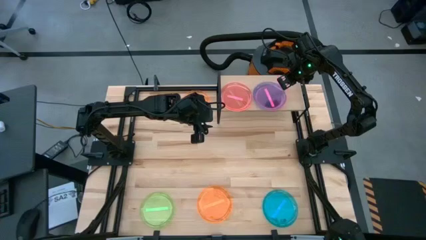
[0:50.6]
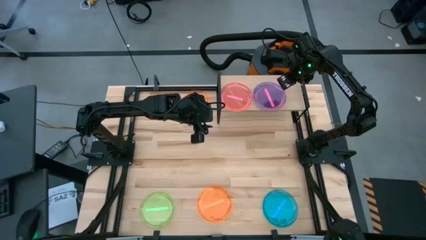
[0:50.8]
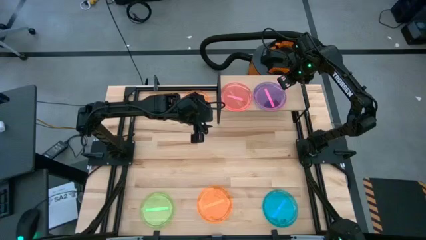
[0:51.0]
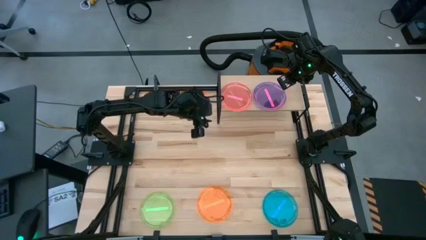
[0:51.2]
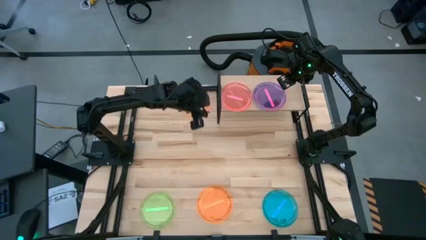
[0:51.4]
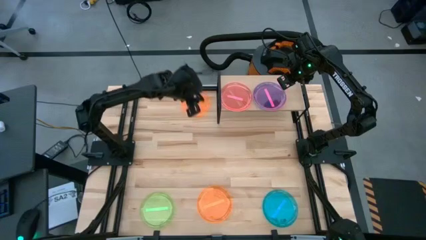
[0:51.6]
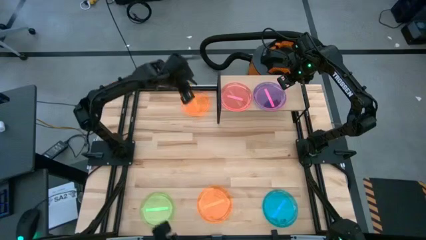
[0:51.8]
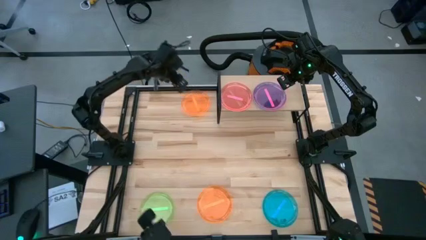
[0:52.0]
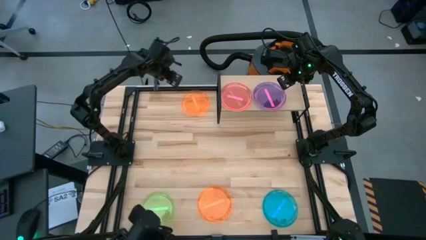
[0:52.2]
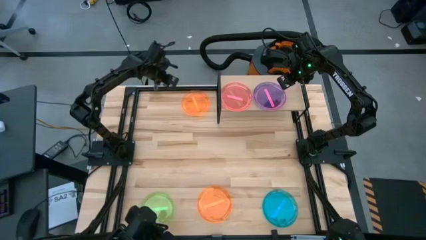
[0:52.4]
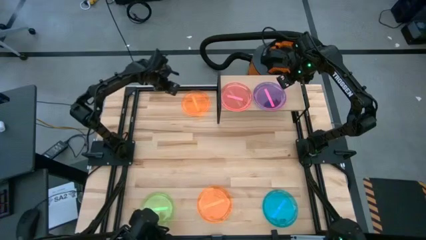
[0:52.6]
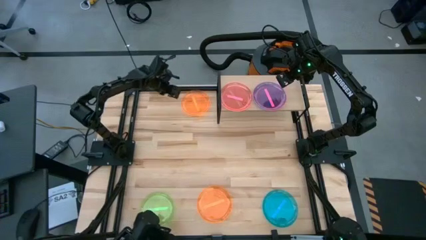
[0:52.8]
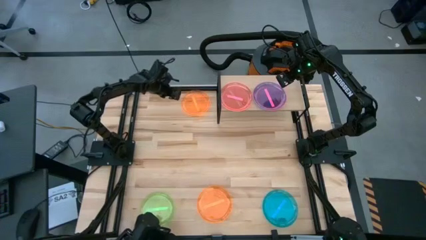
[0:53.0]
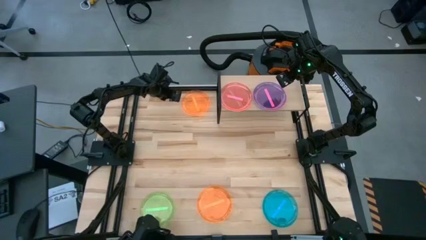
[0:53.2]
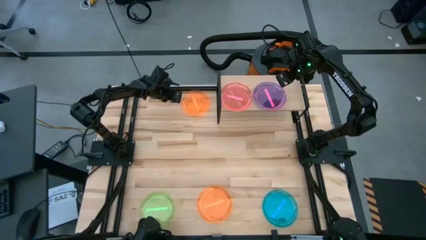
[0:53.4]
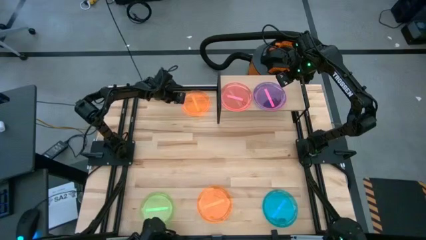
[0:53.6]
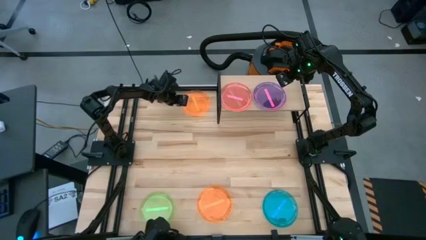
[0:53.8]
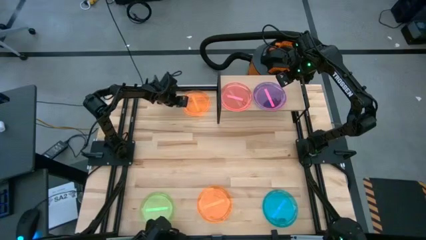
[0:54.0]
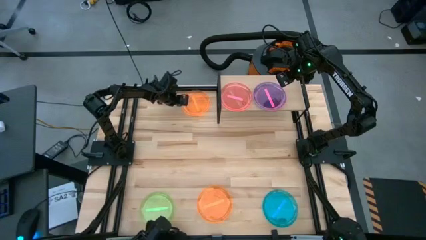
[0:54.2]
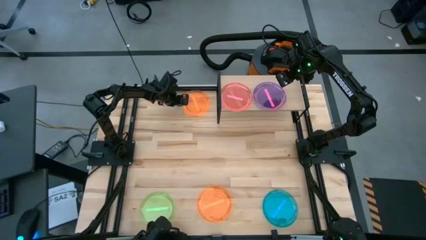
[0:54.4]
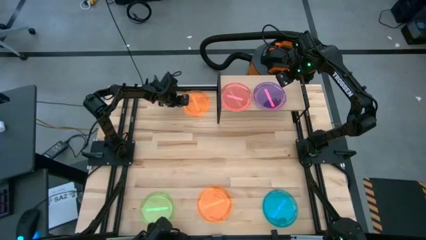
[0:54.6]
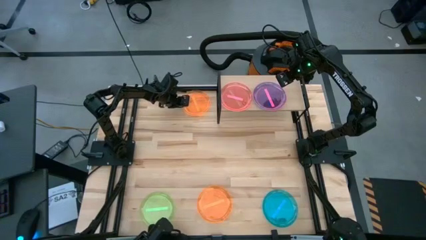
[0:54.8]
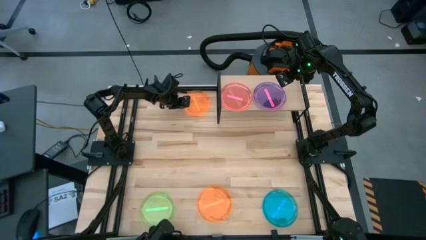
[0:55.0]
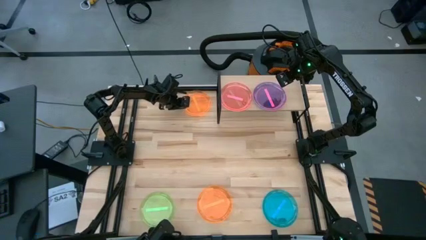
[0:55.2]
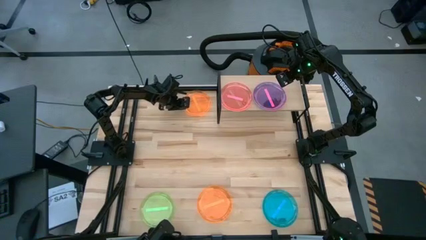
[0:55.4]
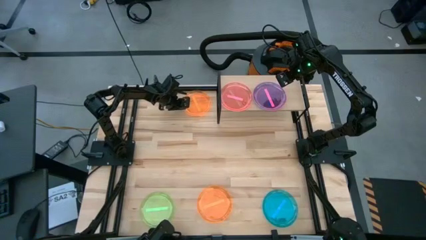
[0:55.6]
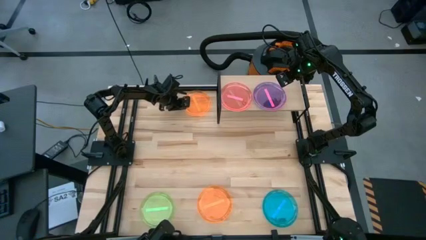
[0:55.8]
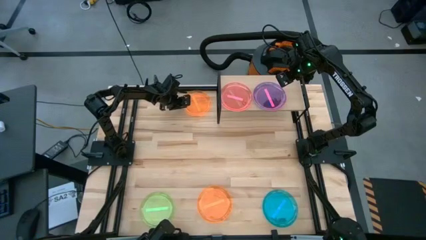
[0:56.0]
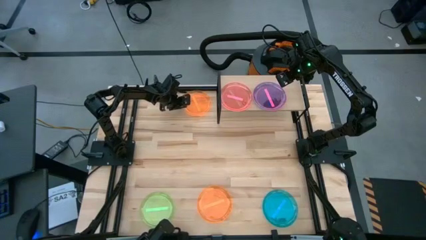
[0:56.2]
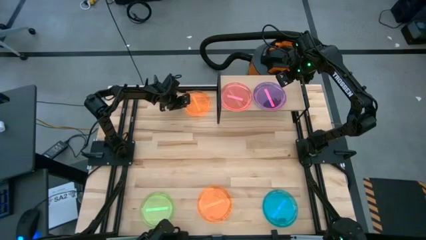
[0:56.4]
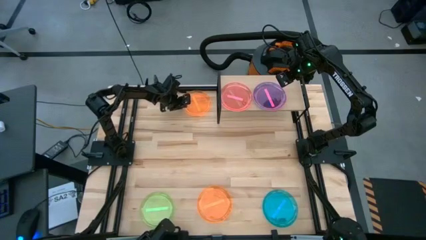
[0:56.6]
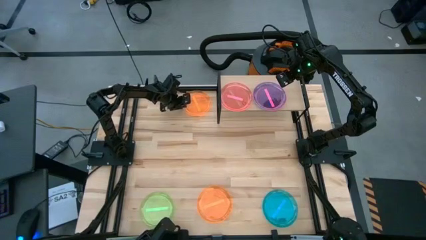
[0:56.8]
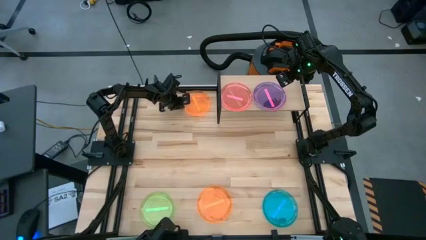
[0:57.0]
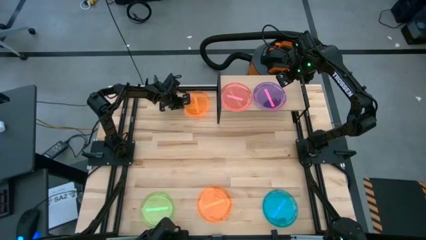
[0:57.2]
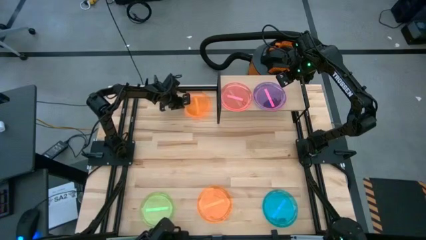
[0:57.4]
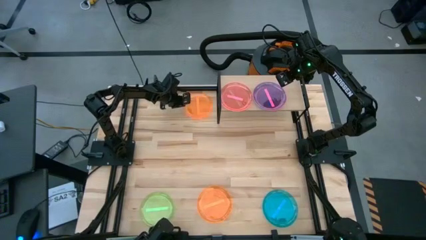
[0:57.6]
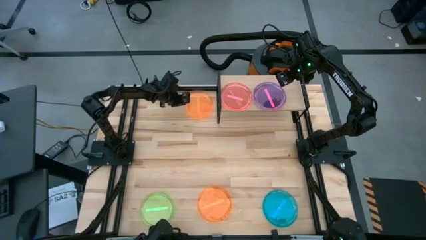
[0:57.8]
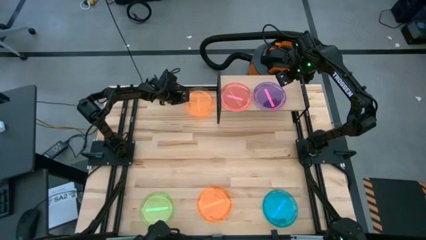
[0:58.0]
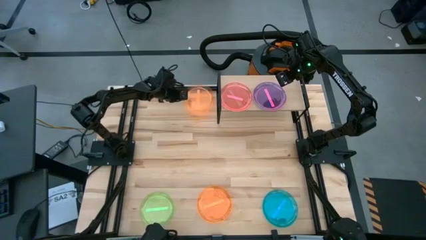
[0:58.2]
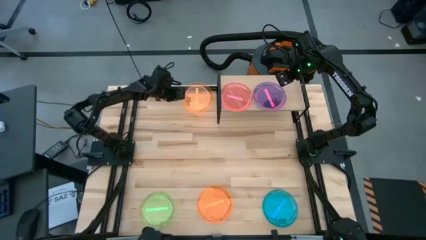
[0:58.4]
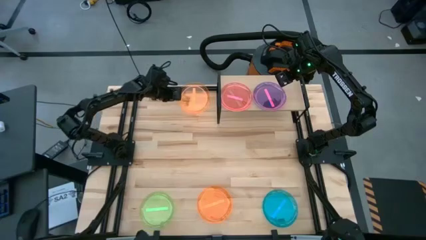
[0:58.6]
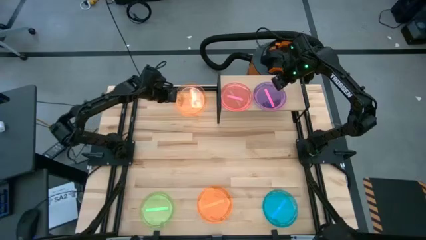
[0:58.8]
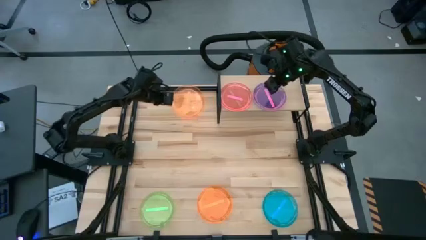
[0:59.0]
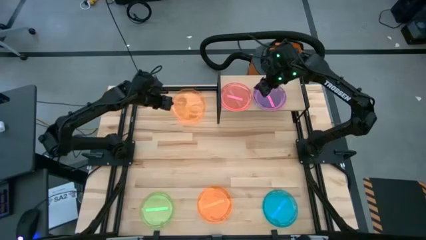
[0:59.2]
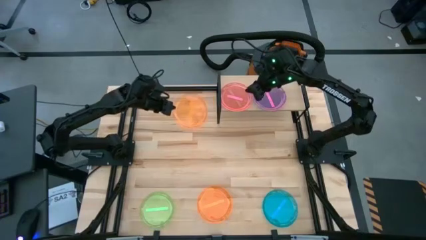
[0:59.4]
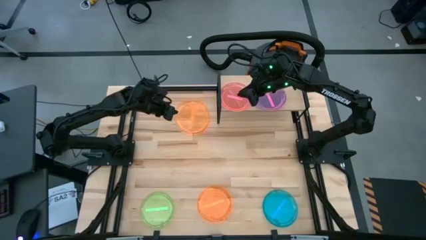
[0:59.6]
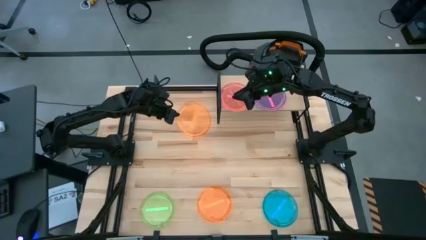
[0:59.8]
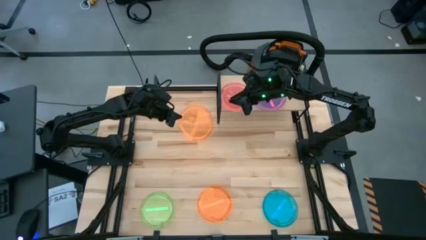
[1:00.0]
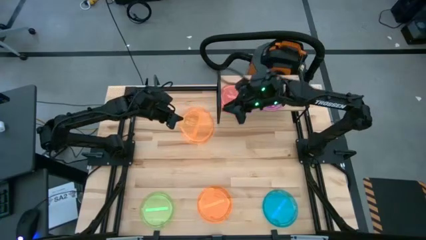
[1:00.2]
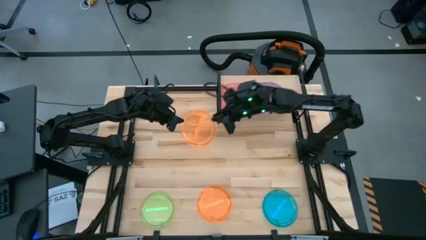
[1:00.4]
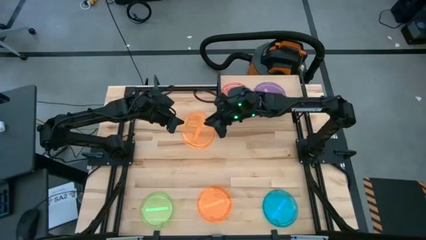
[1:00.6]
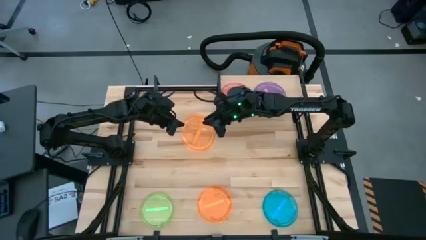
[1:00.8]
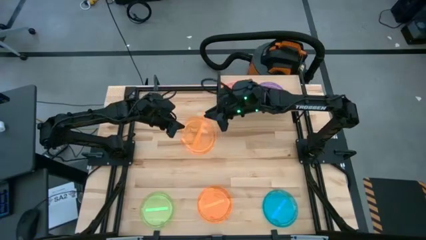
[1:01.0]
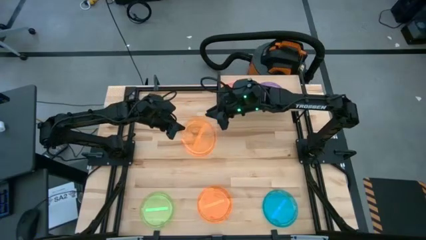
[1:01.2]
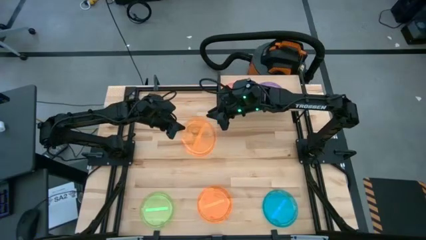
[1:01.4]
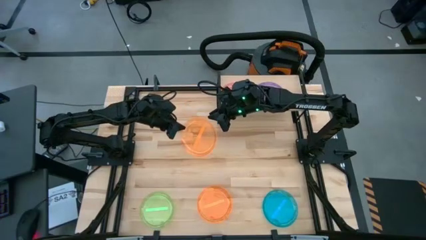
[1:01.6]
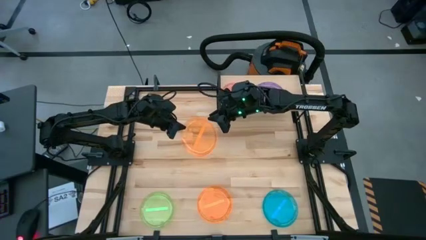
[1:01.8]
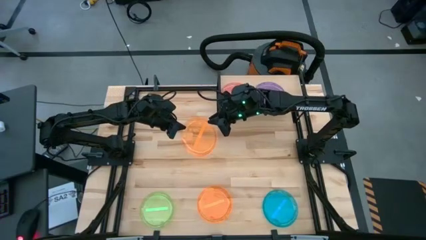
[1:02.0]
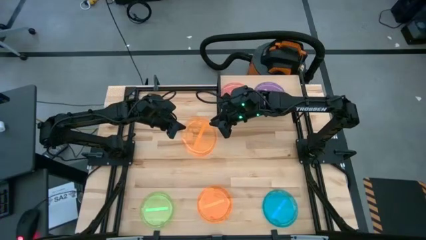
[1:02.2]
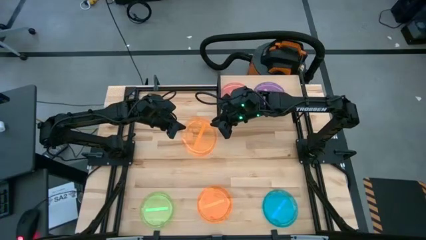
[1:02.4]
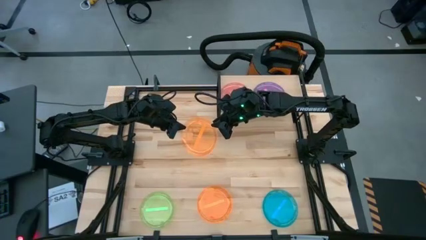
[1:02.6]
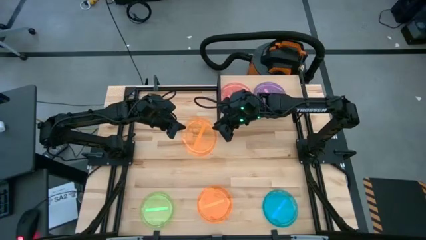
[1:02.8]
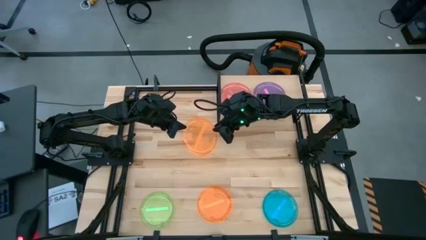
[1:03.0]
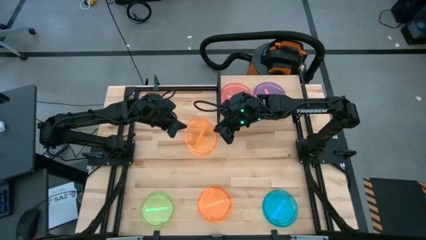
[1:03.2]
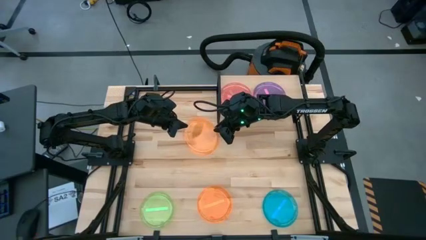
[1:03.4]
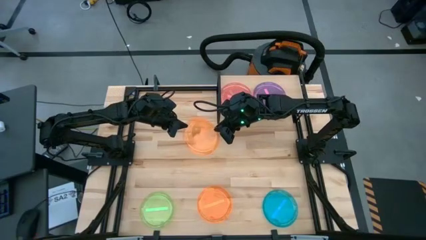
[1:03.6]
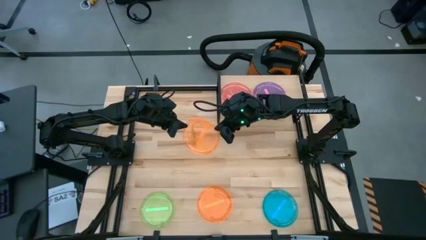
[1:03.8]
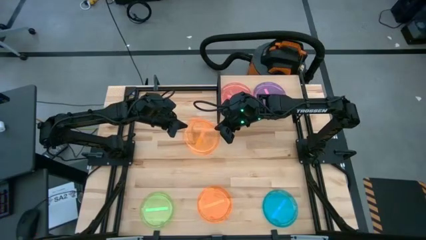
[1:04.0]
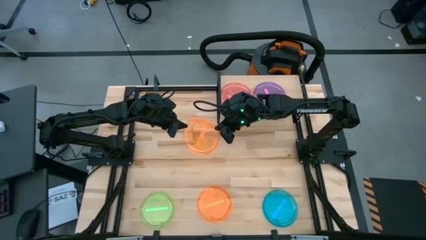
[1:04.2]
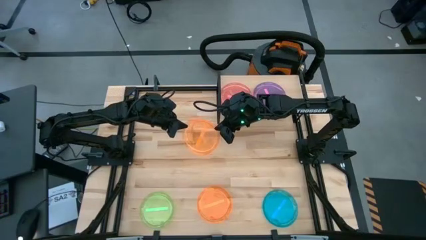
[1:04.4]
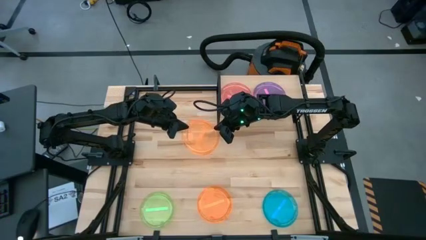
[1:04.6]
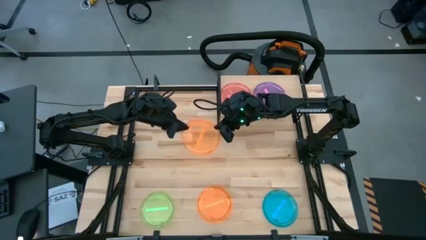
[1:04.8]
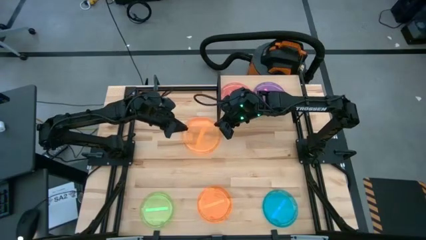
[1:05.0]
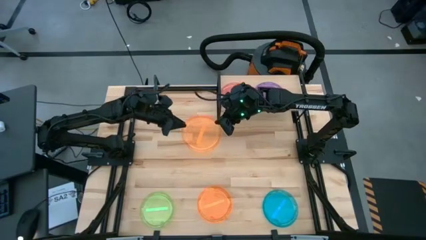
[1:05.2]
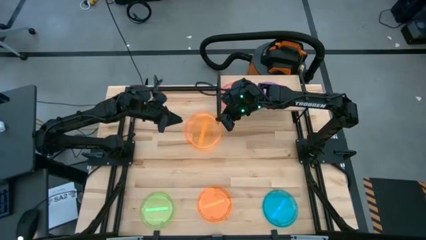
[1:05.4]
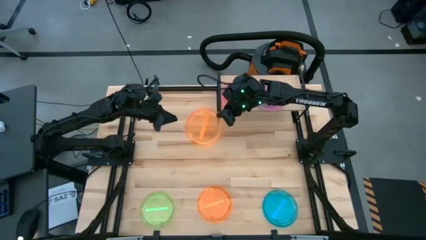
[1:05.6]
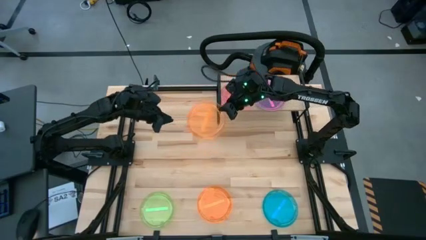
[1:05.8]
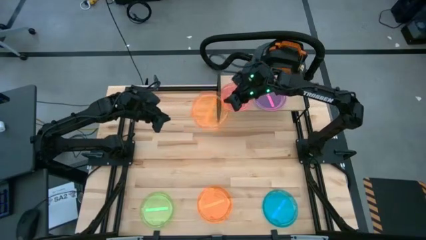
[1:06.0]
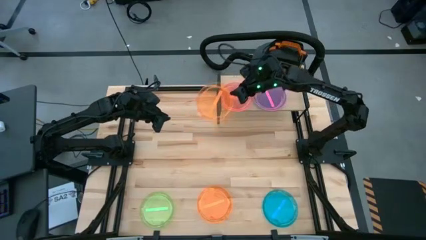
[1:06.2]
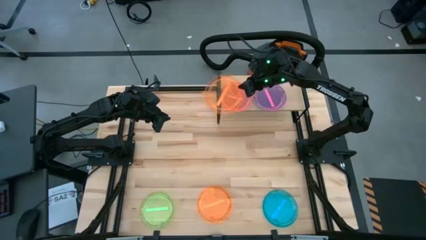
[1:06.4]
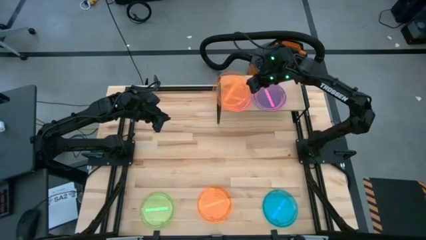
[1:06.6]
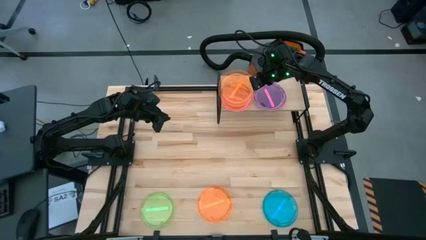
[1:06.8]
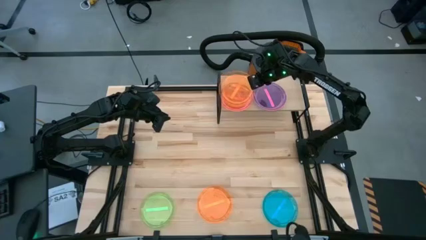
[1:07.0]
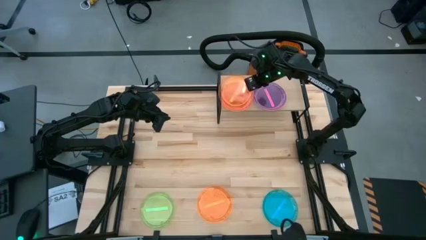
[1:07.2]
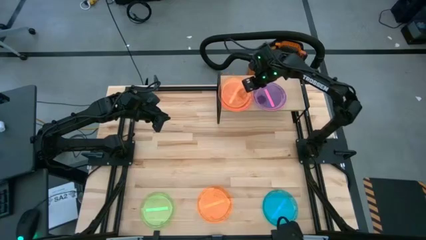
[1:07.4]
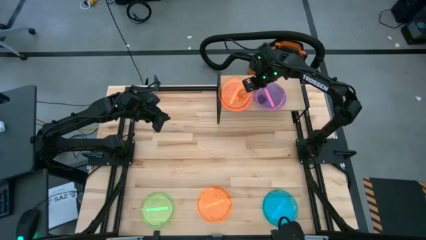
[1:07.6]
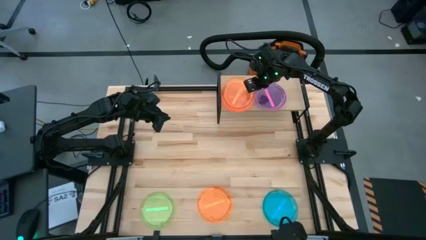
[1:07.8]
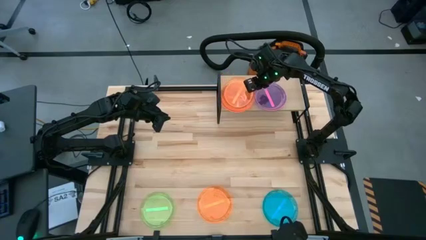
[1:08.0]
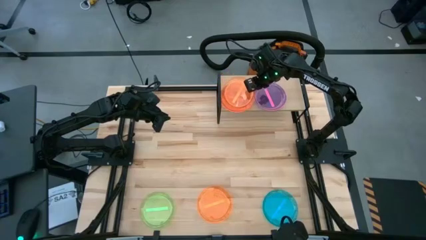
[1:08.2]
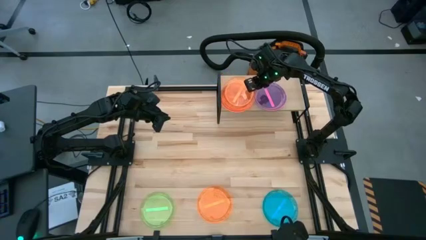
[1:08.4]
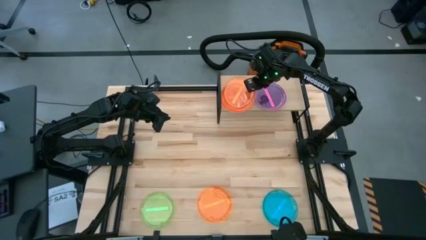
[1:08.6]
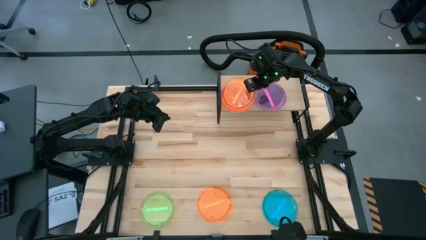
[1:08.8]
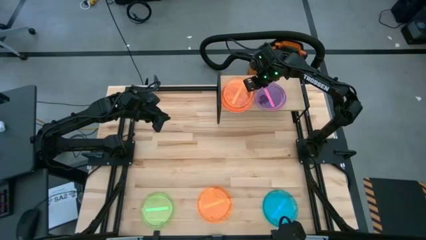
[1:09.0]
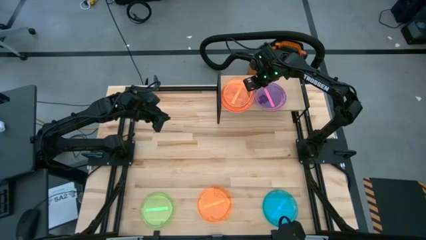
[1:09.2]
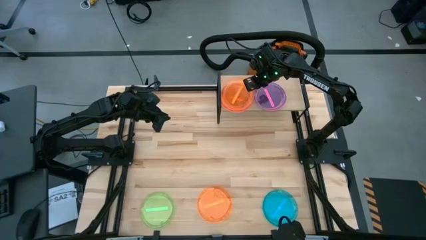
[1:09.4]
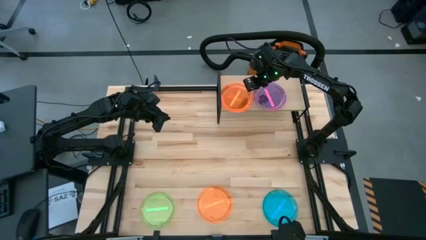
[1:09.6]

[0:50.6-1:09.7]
Task: Place and stack plates onto a shelf
Stack the top orange plate on top of the pink plate on the shelf
